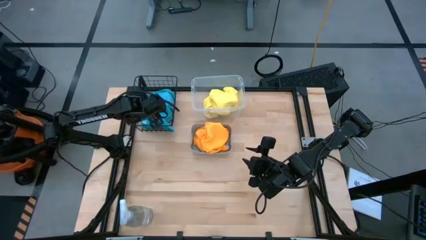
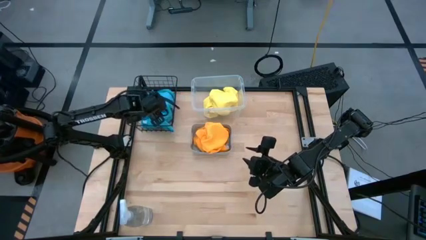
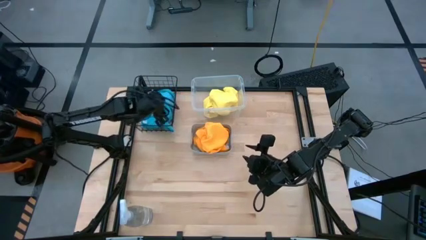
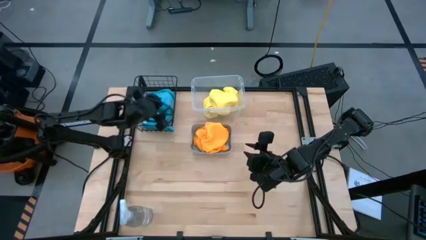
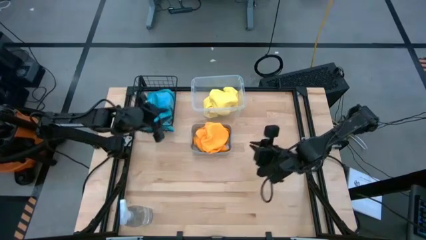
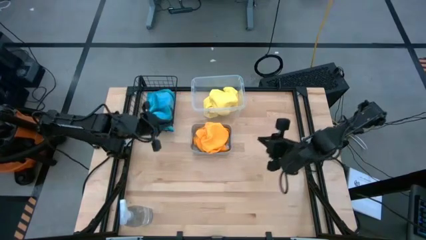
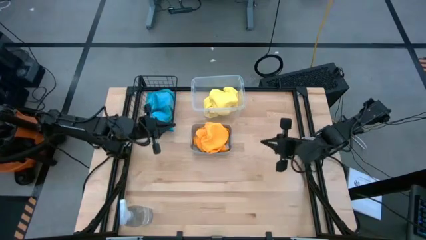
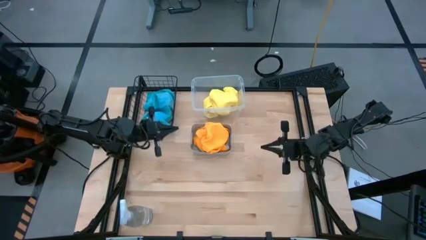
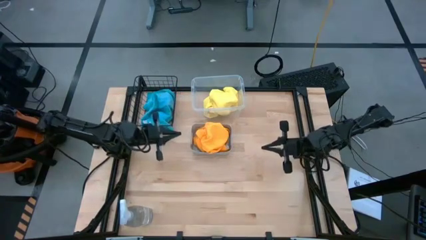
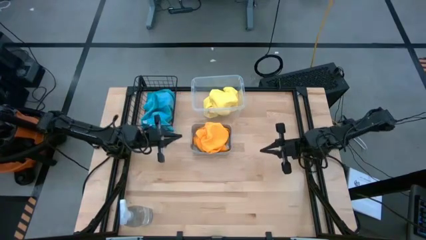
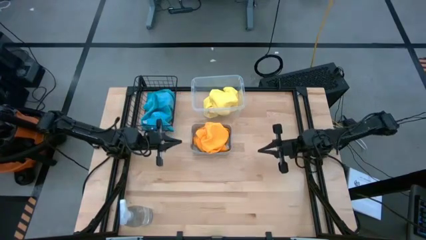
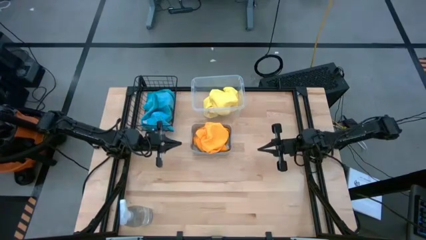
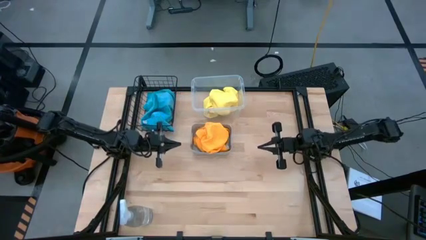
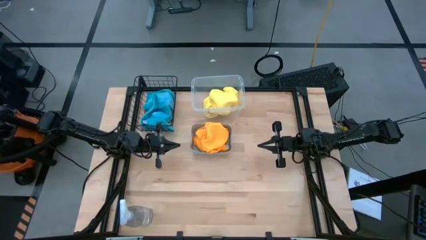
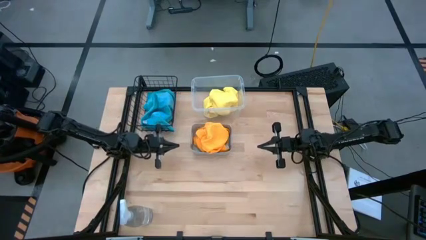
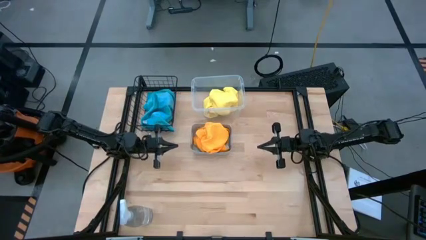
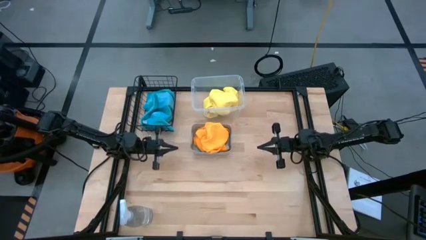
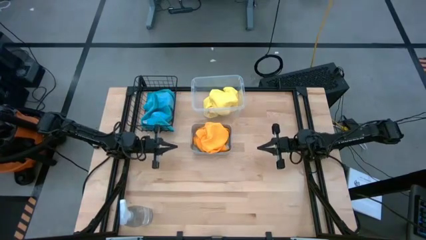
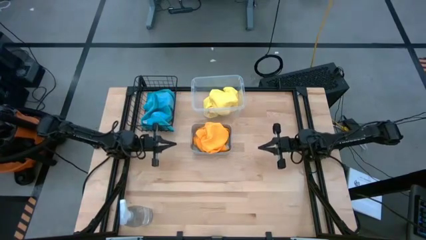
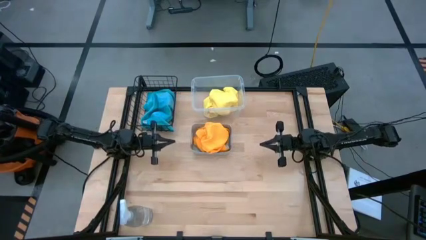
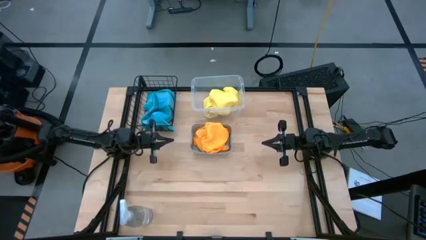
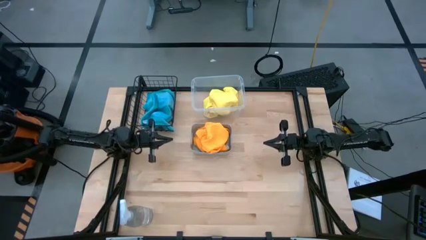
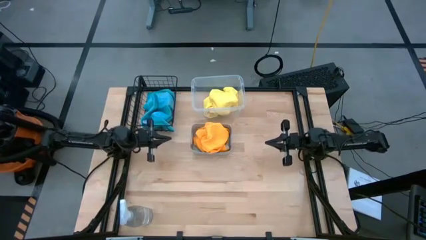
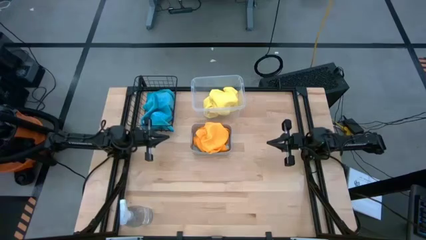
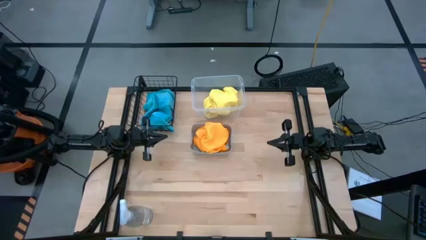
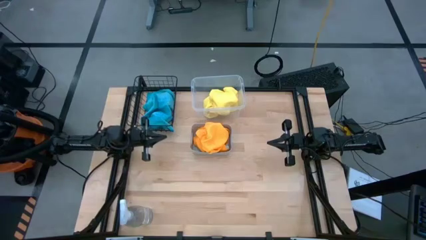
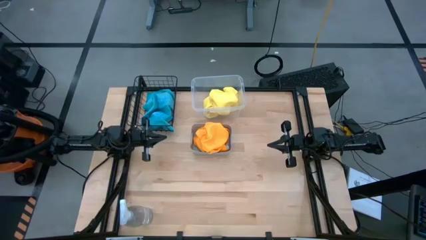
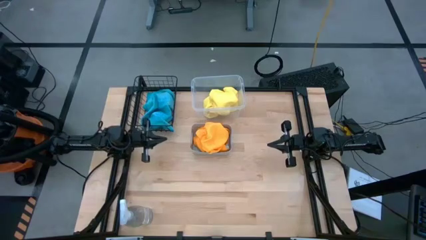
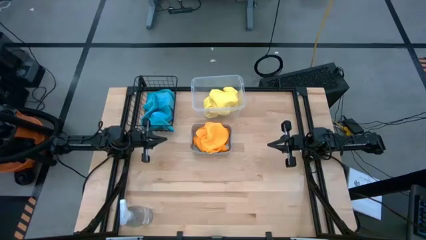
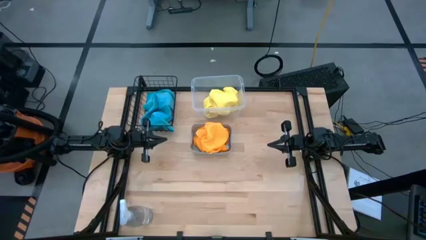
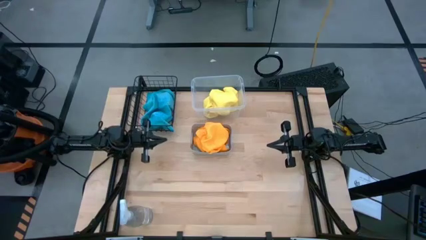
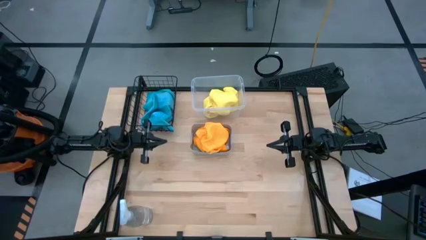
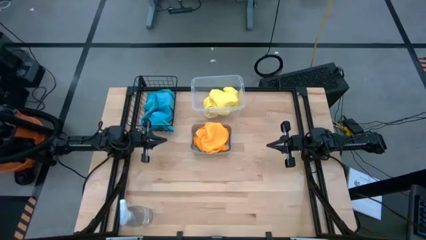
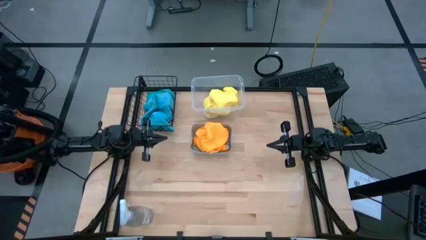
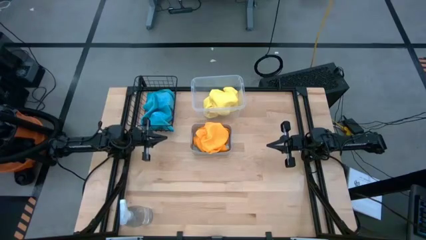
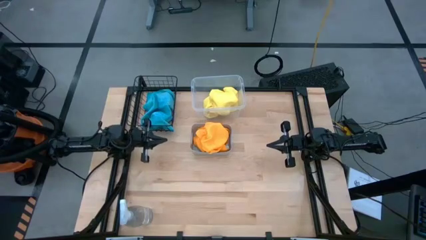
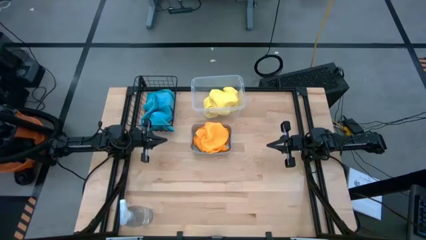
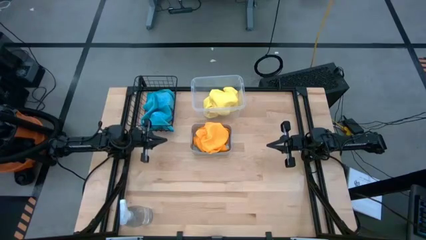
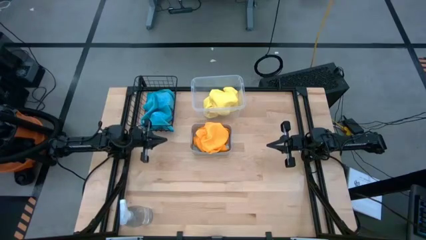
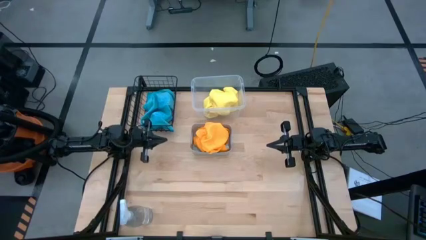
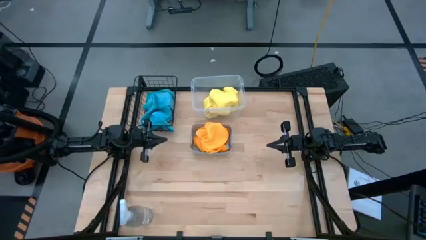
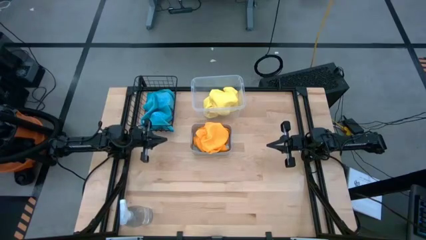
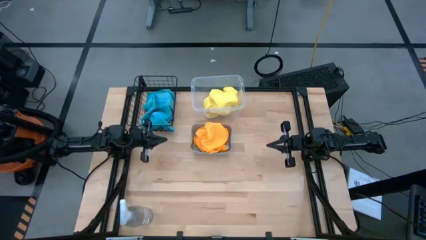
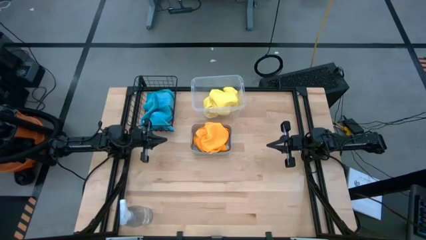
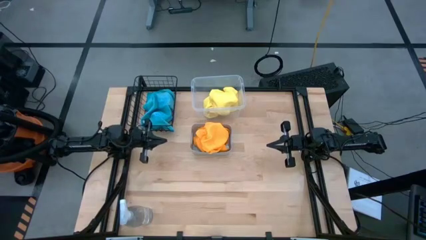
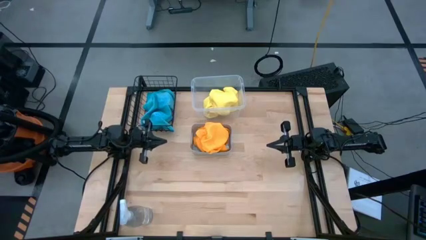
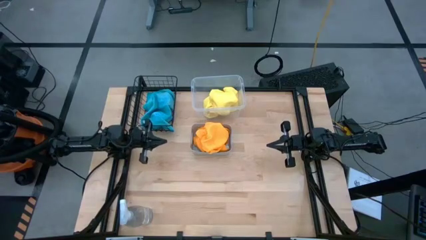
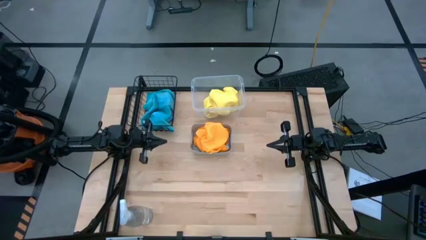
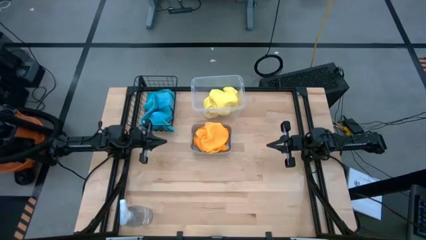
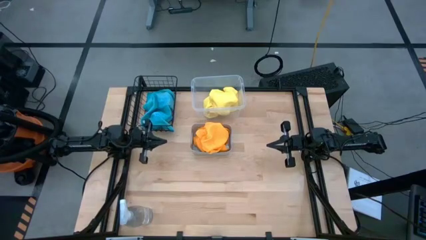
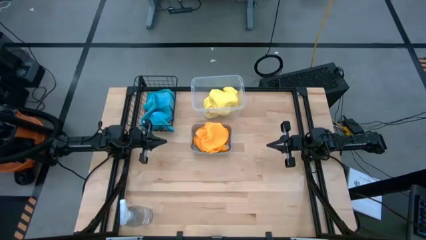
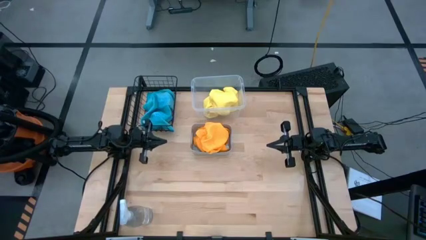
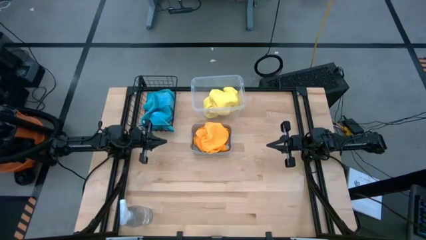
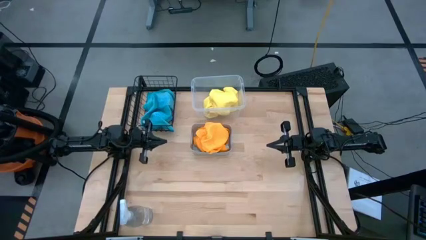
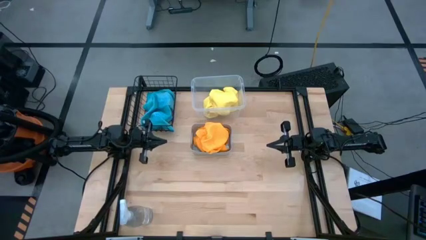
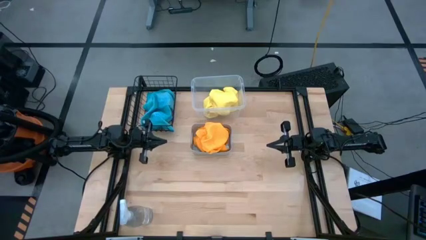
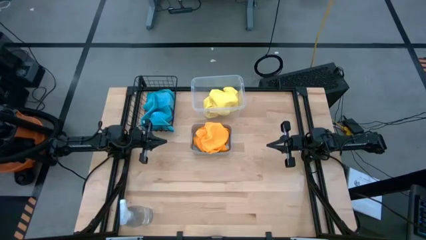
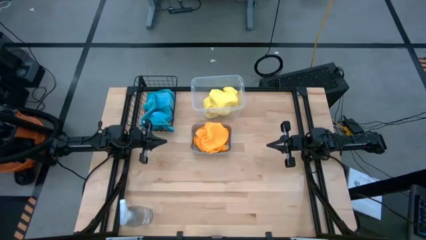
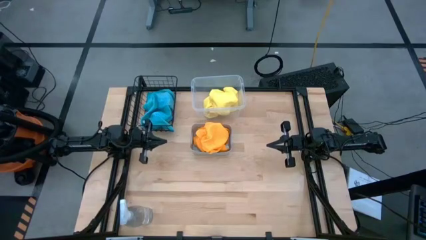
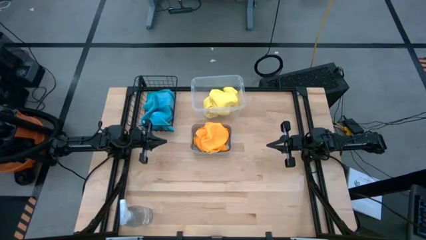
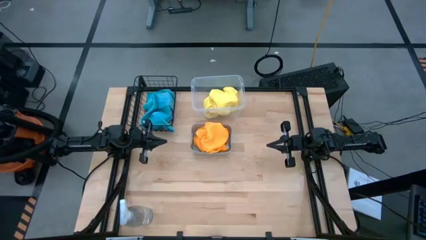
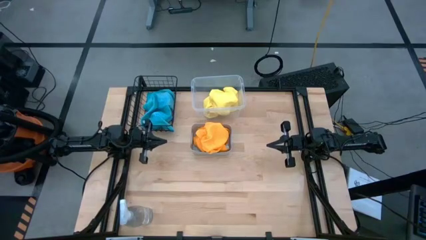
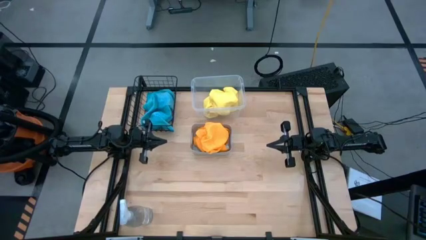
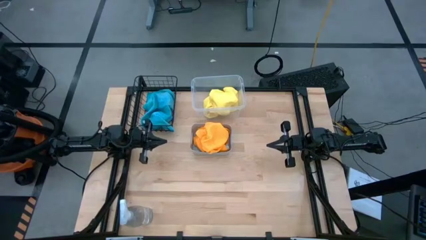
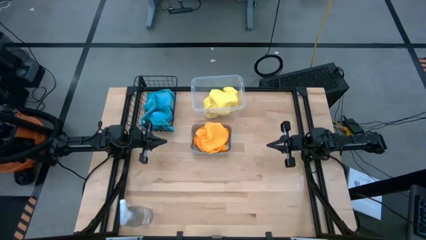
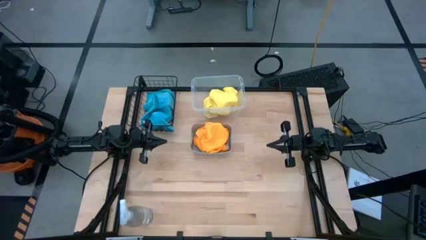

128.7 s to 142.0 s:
Task: Sort microfiber towel by color & place in baskets
Return to Home Position

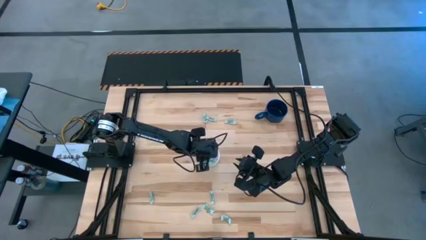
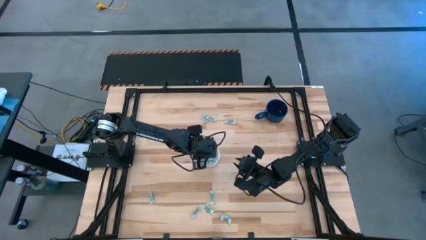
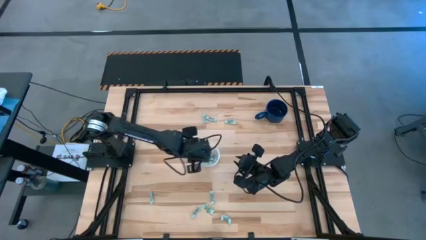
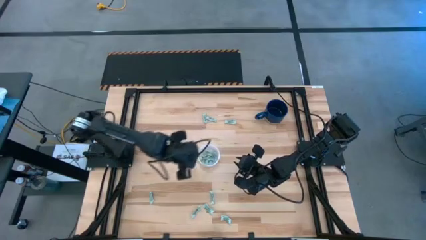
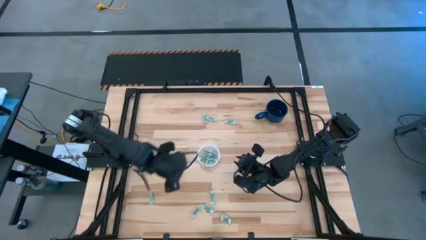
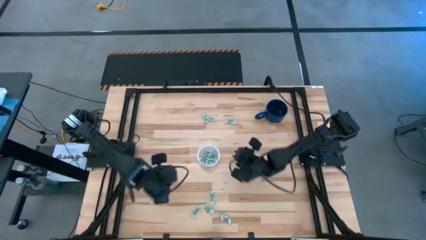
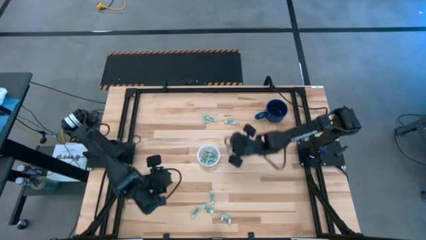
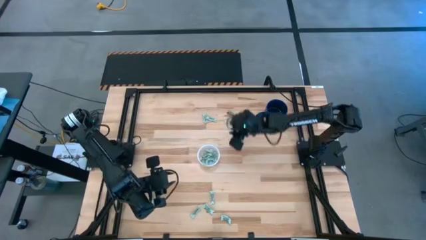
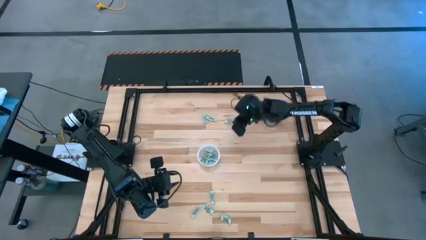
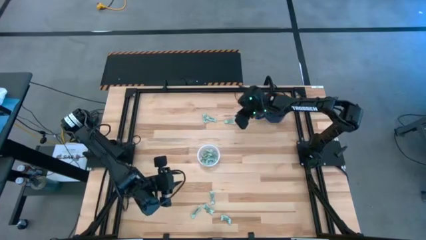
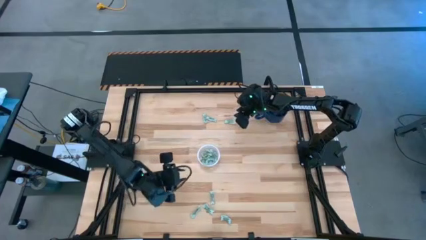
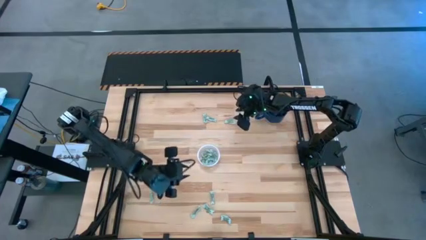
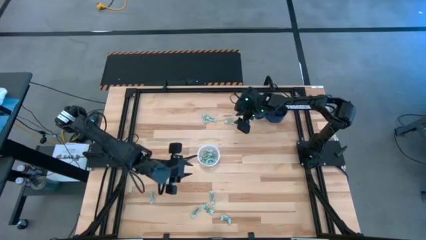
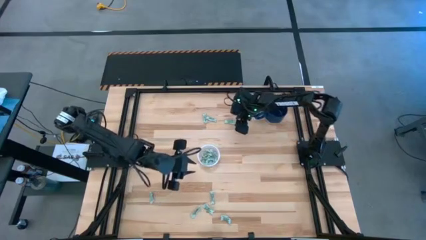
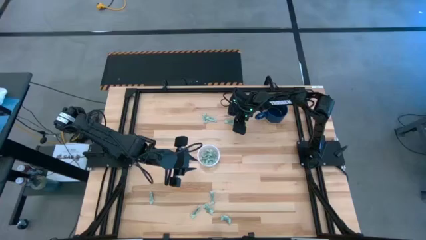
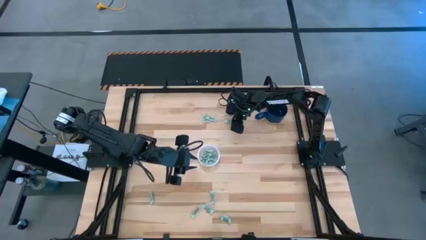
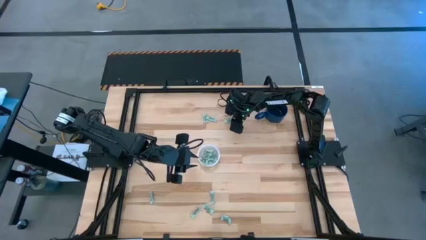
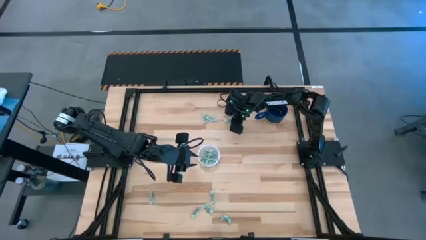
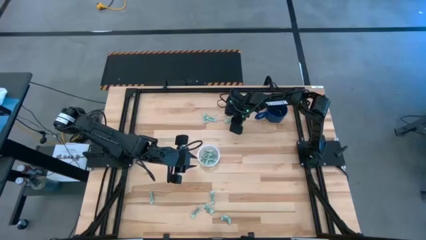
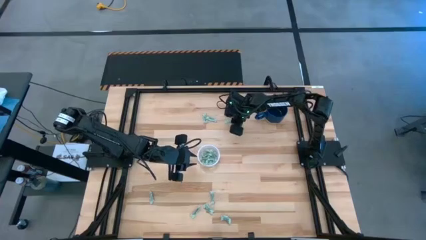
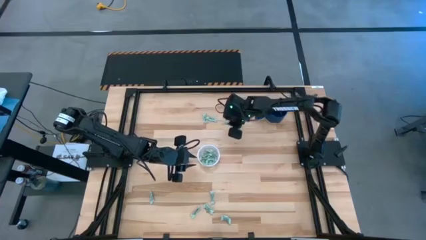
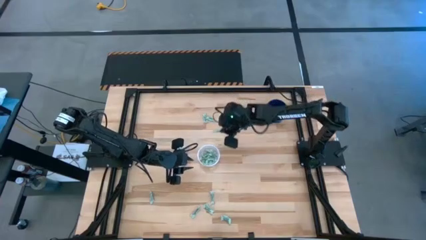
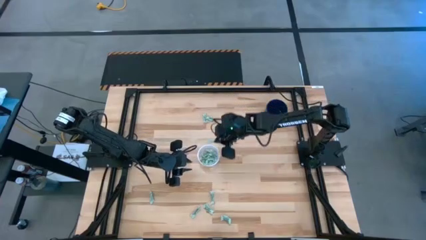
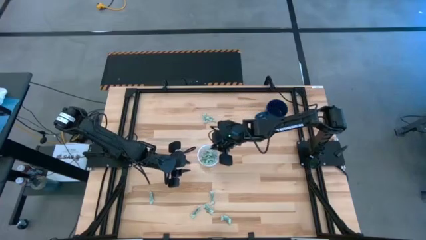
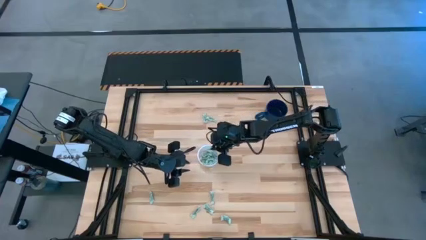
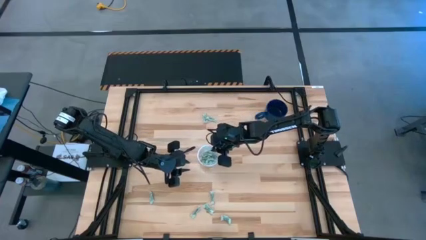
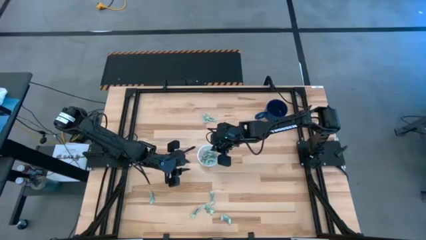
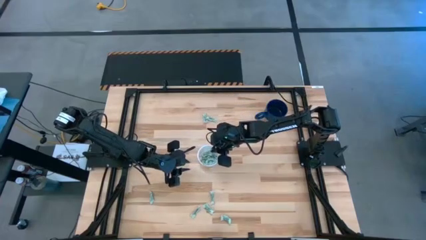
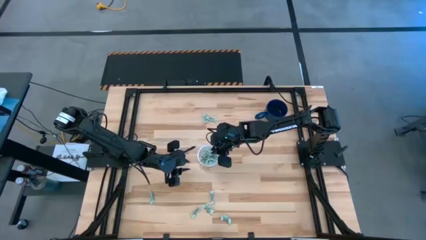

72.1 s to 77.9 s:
Task: Pick and place items into bin
Put the stevia packet into the transparent bin
